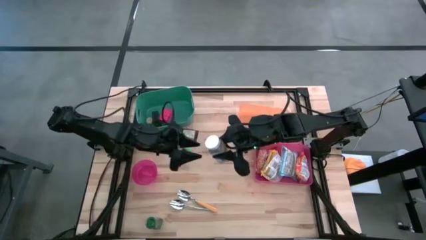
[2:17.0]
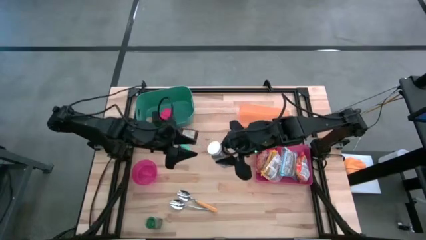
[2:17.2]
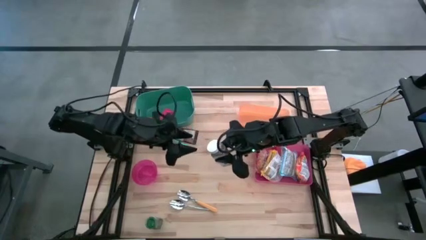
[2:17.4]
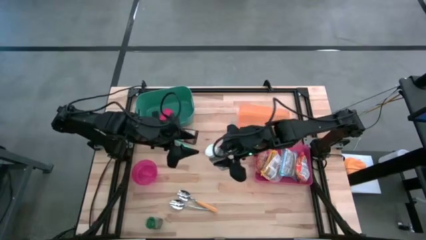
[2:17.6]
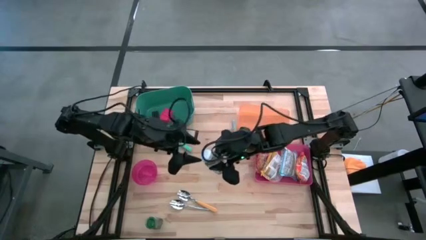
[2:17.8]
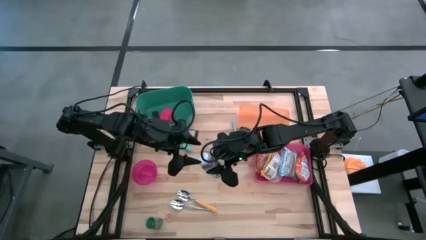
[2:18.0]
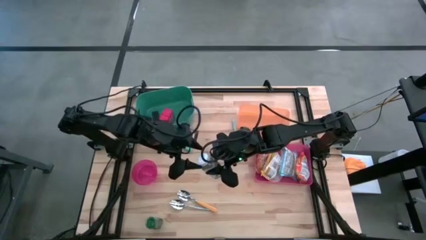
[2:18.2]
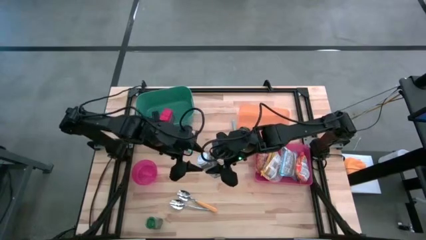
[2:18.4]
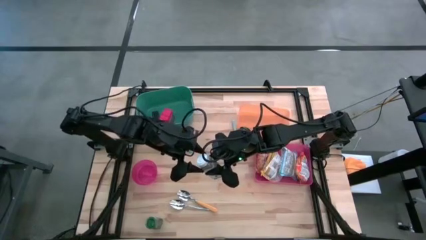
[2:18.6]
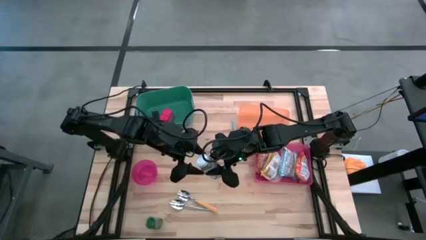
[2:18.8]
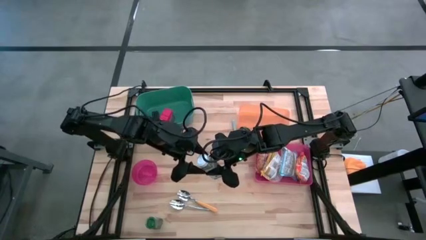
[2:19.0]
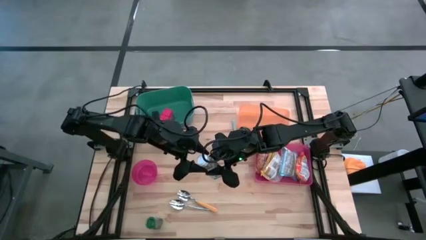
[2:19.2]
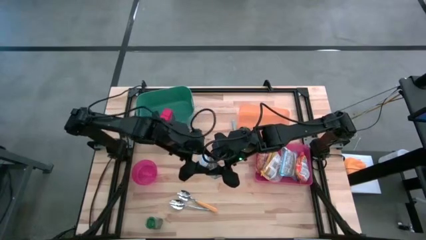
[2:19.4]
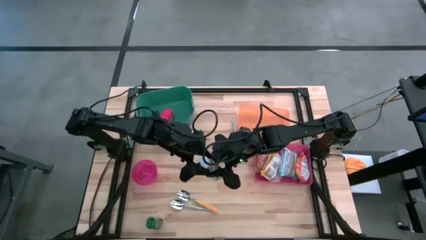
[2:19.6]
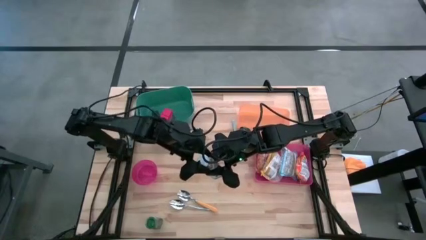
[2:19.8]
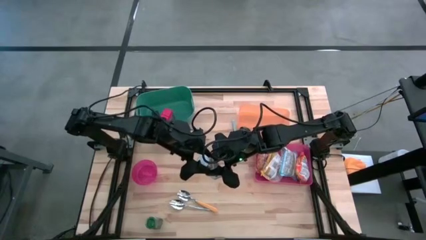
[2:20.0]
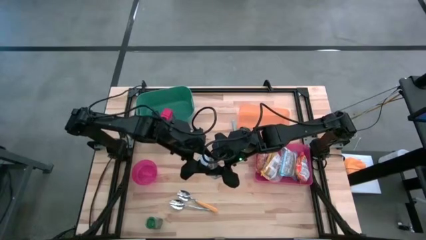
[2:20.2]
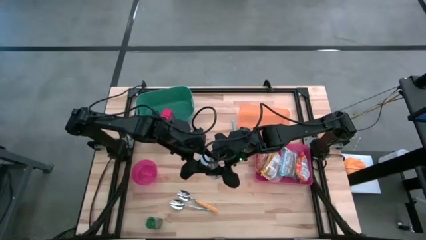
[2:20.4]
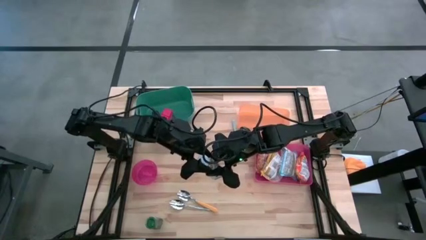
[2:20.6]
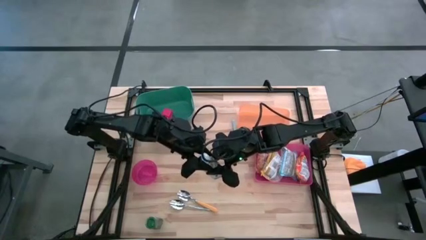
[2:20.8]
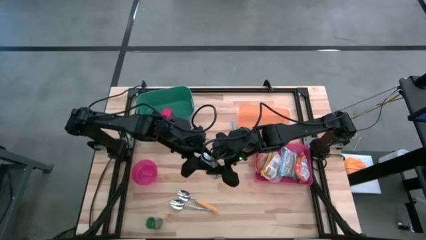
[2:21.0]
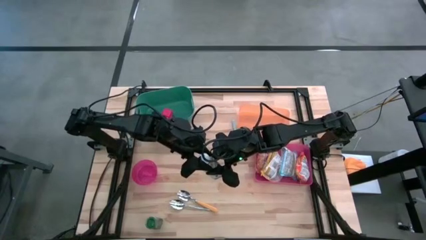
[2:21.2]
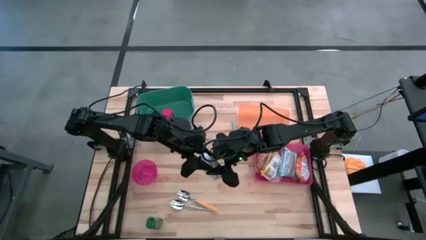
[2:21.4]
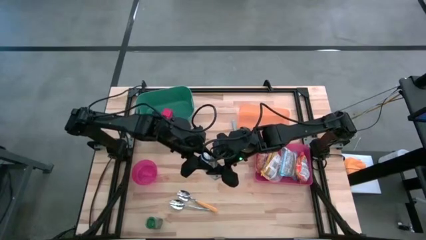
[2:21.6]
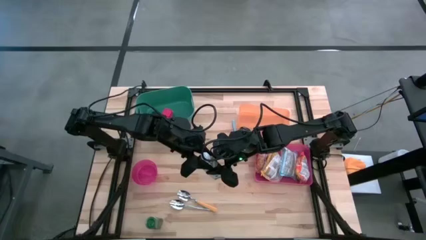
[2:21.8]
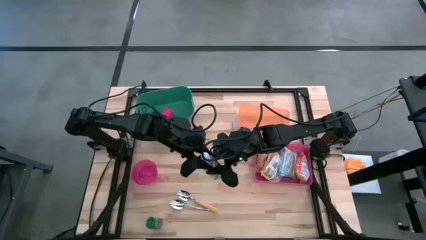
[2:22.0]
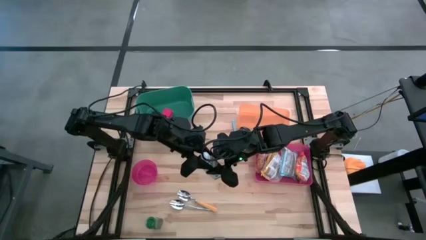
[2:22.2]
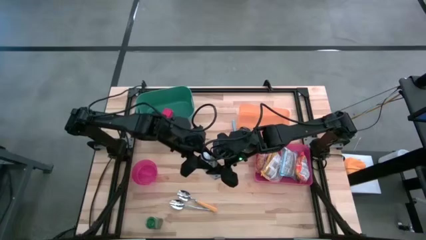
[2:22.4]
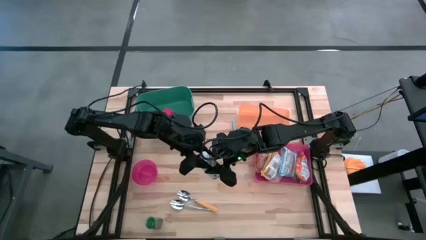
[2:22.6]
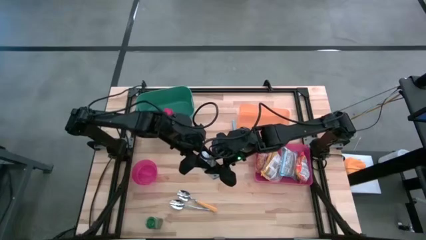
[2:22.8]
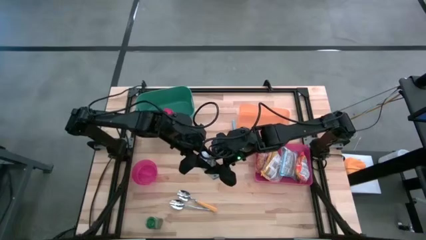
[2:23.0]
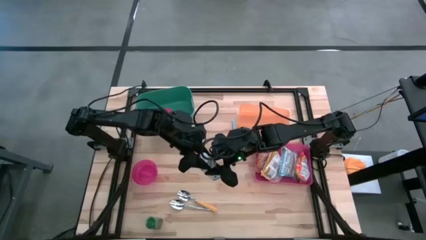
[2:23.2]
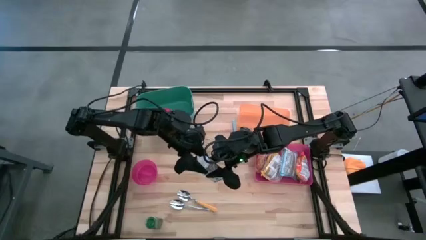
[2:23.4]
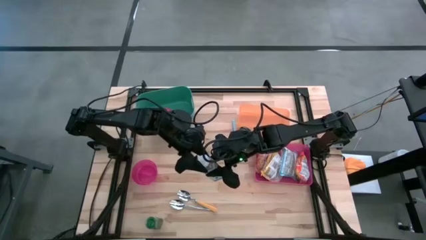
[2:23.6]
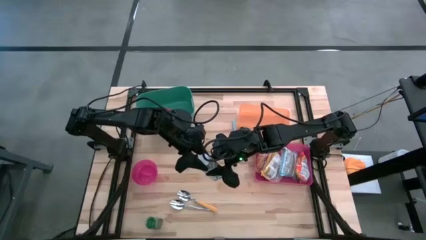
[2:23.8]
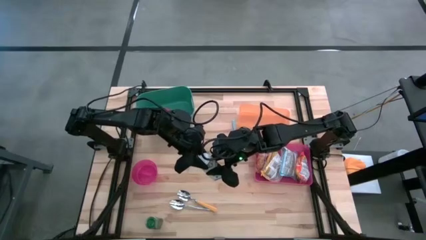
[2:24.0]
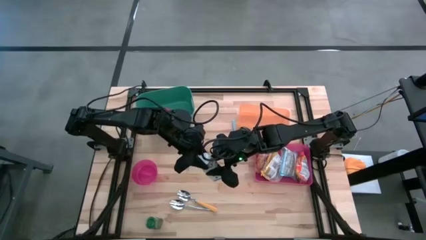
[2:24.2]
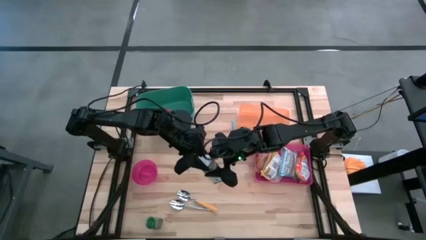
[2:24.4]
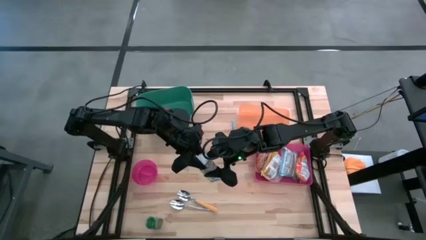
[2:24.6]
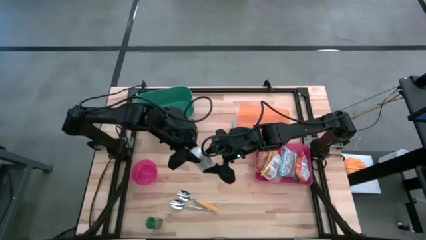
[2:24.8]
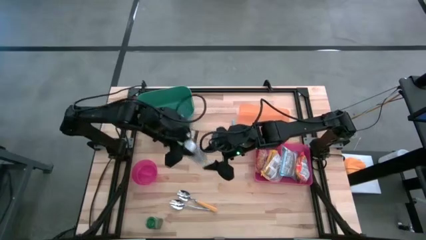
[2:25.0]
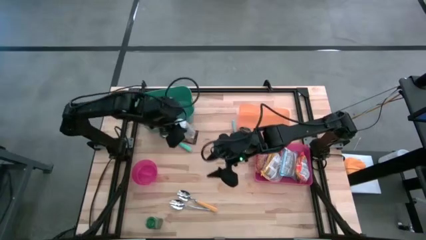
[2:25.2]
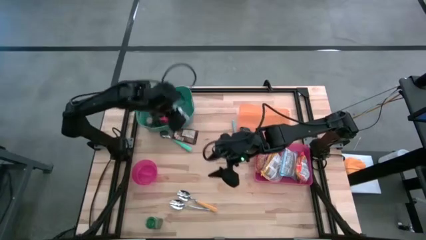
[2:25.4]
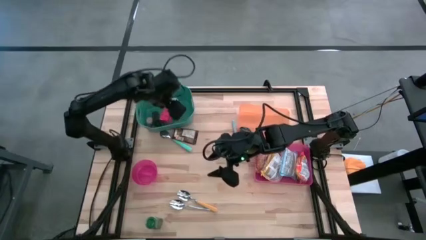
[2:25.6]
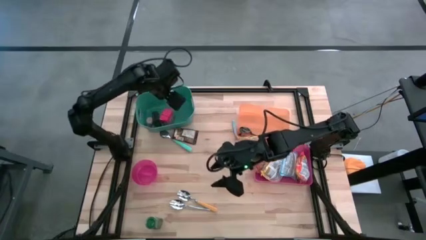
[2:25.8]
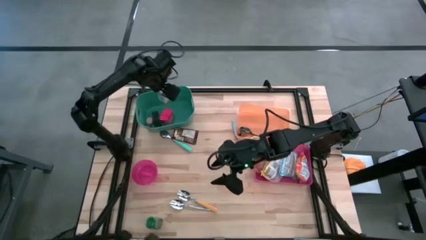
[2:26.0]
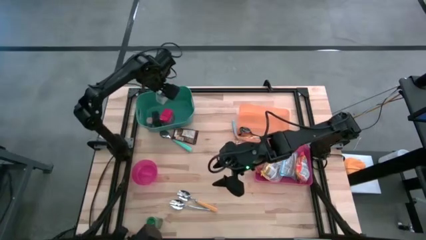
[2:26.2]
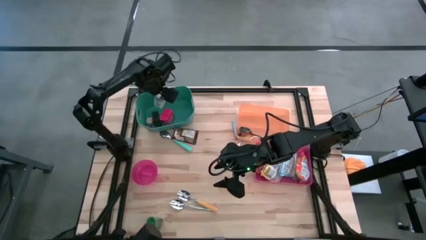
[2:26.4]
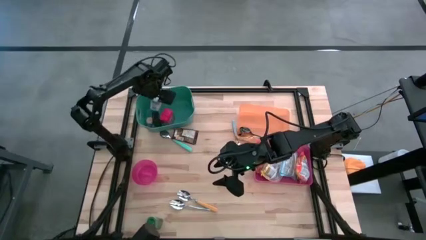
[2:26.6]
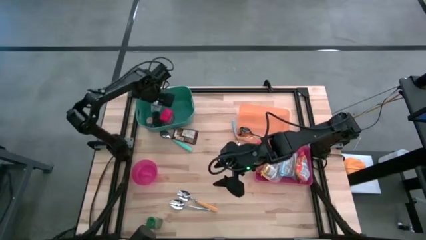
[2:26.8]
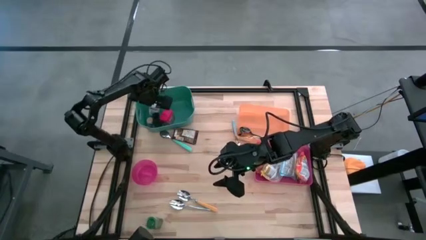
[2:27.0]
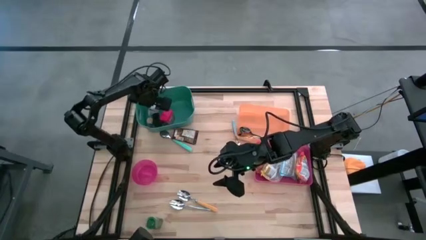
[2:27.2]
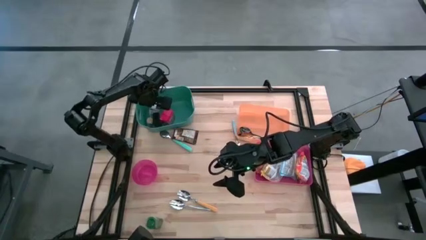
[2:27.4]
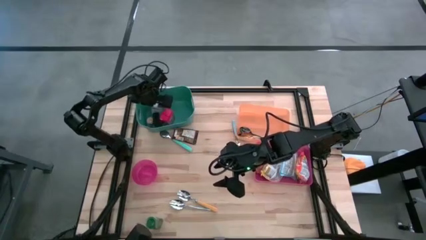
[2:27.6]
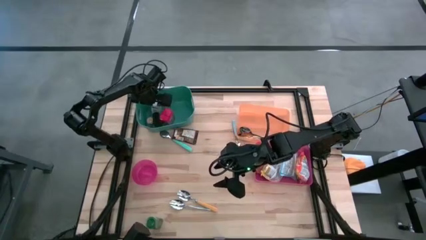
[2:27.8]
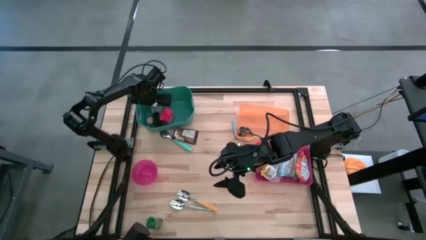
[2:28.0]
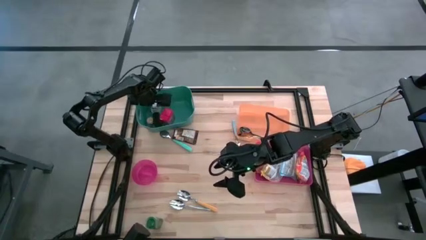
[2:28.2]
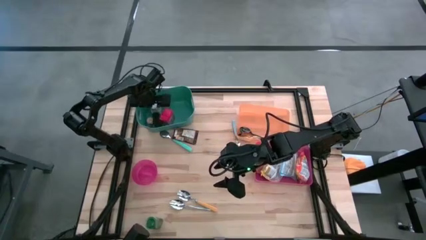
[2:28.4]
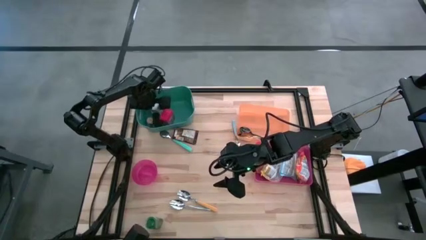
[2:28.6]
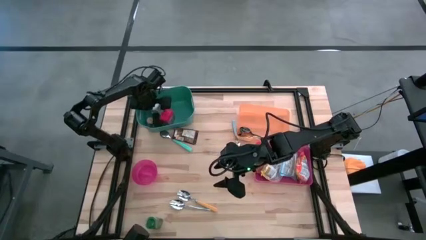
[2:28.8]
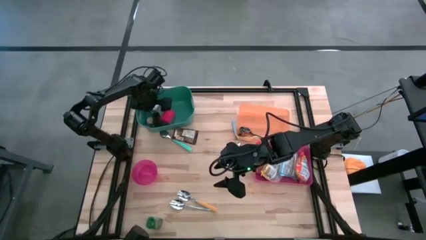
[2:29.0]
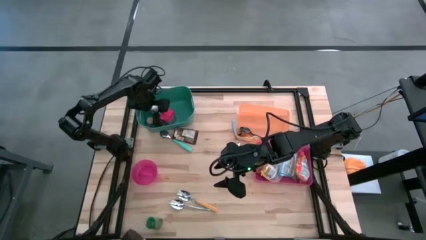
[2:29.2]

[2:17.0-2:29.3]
Put the white seasoning bottle into the green bin
